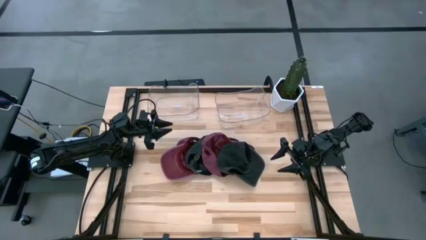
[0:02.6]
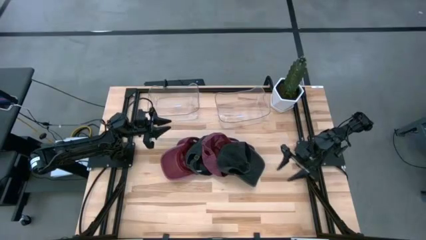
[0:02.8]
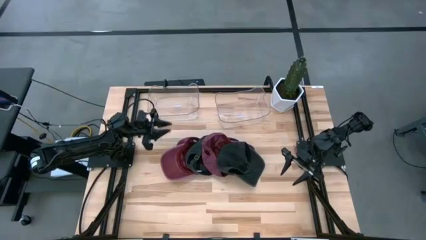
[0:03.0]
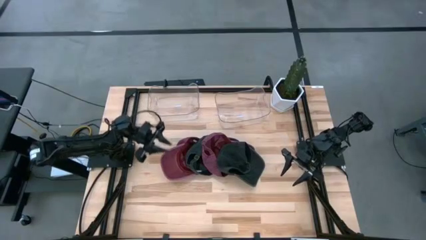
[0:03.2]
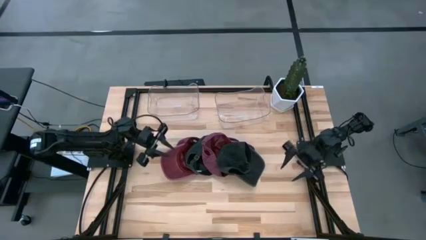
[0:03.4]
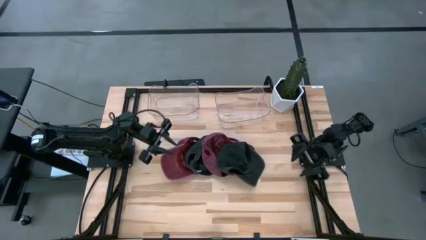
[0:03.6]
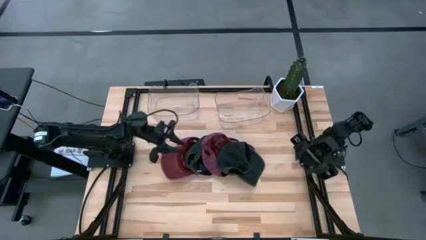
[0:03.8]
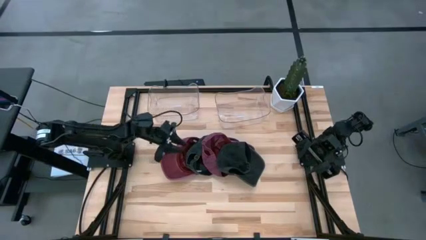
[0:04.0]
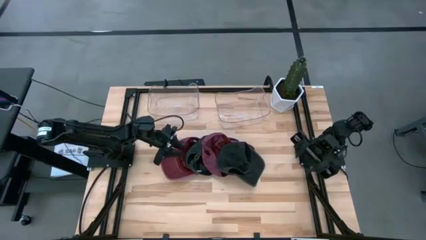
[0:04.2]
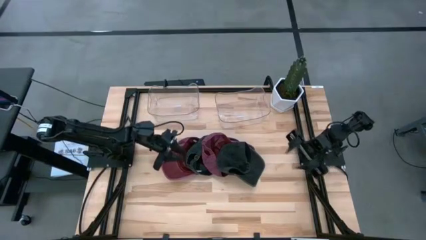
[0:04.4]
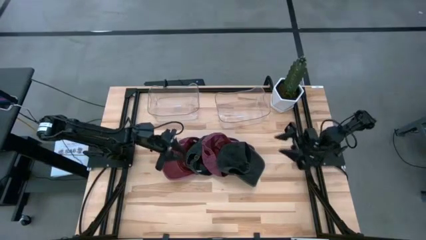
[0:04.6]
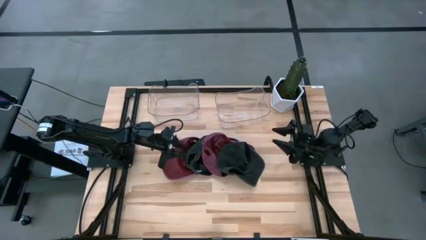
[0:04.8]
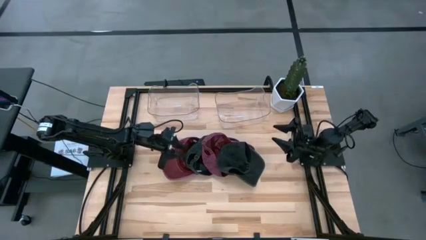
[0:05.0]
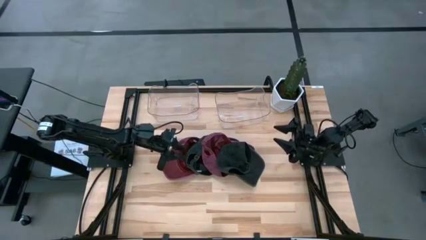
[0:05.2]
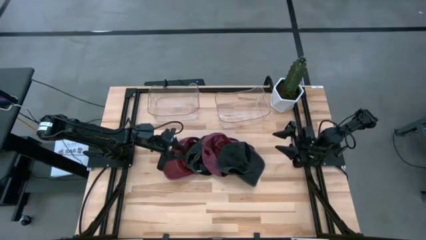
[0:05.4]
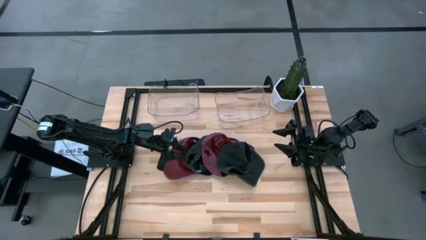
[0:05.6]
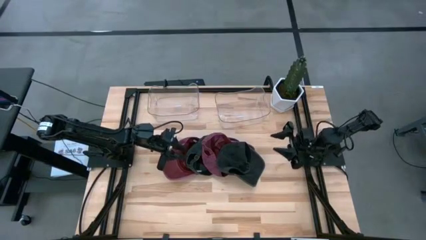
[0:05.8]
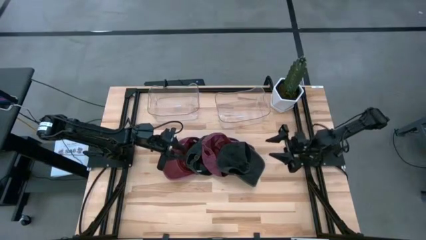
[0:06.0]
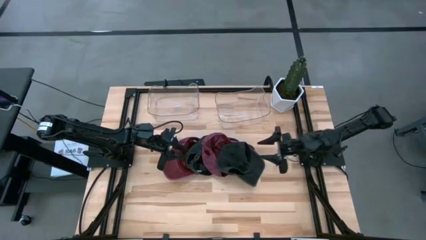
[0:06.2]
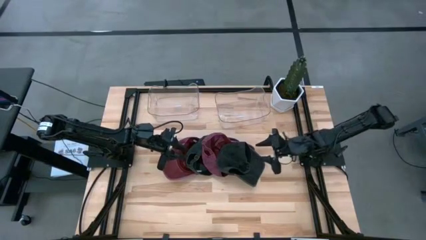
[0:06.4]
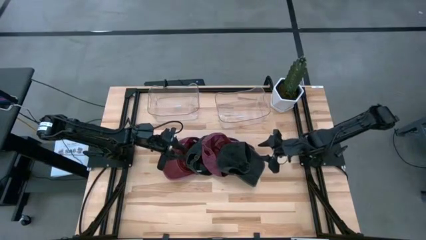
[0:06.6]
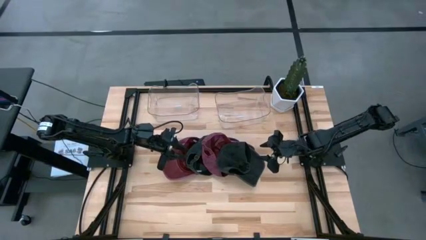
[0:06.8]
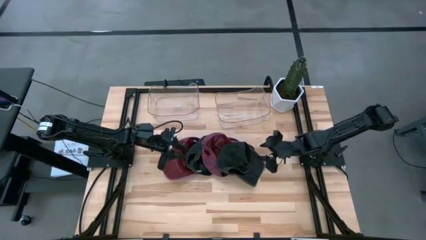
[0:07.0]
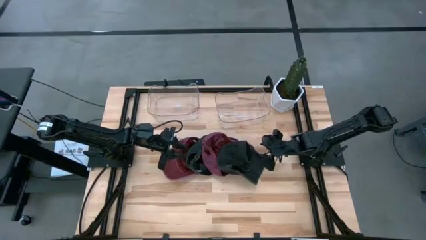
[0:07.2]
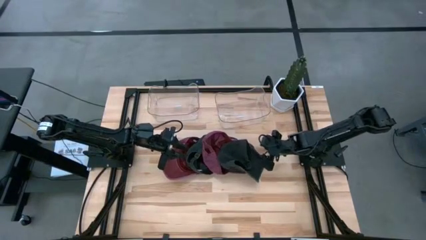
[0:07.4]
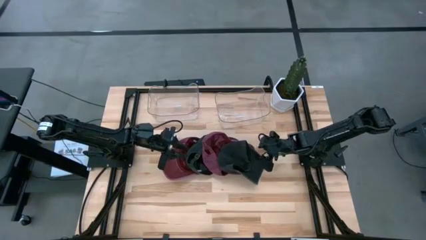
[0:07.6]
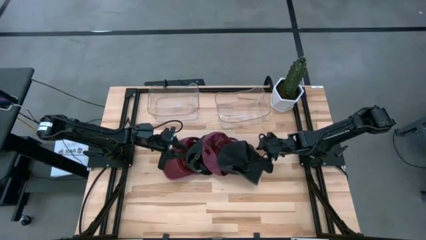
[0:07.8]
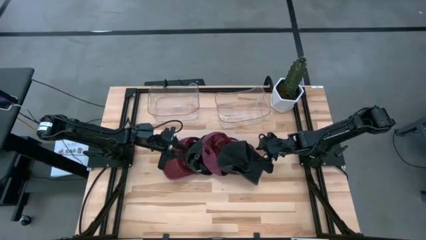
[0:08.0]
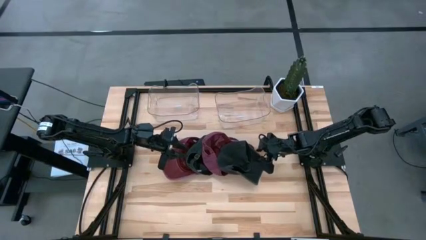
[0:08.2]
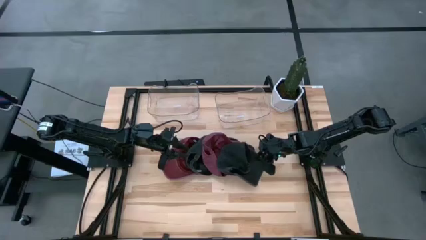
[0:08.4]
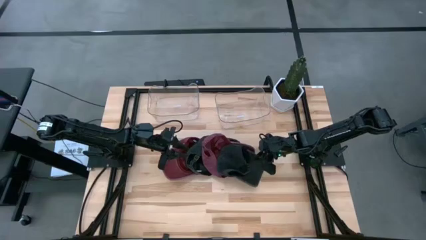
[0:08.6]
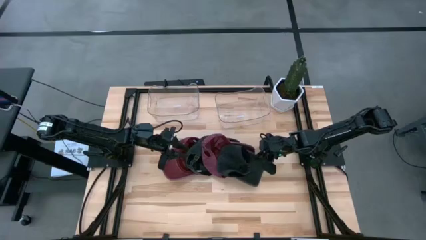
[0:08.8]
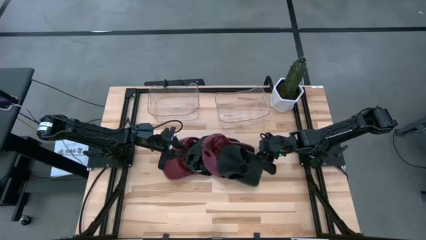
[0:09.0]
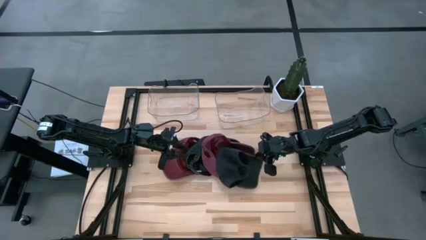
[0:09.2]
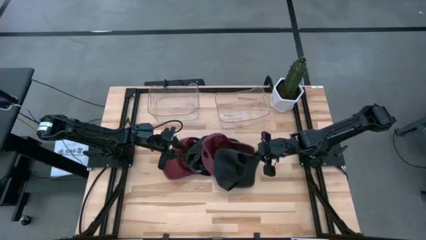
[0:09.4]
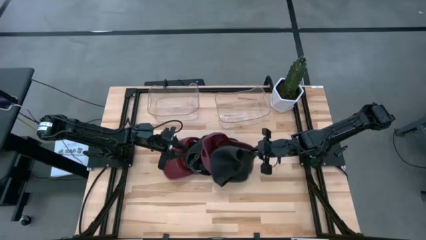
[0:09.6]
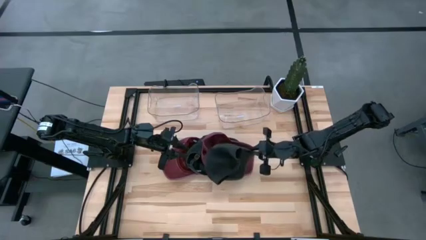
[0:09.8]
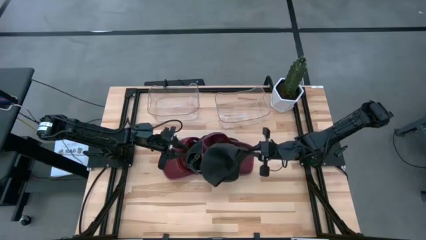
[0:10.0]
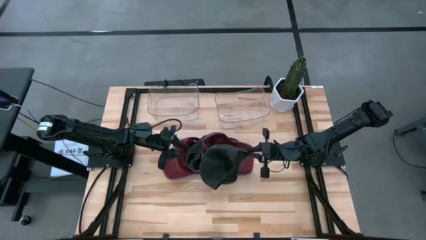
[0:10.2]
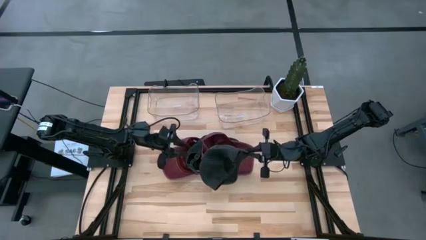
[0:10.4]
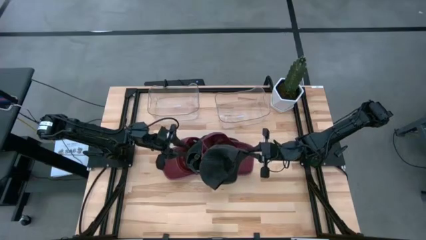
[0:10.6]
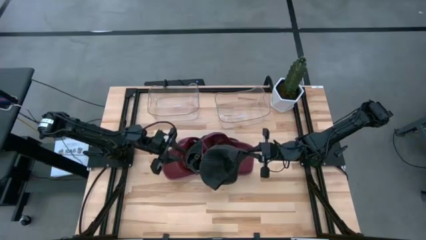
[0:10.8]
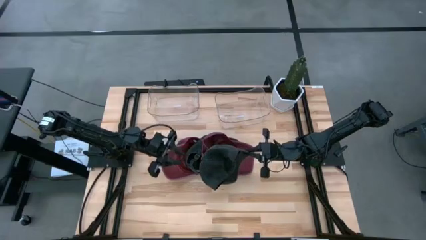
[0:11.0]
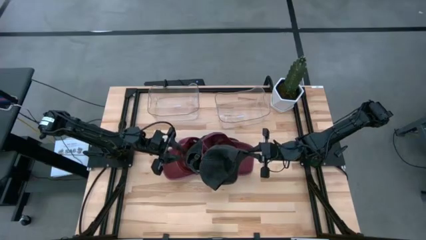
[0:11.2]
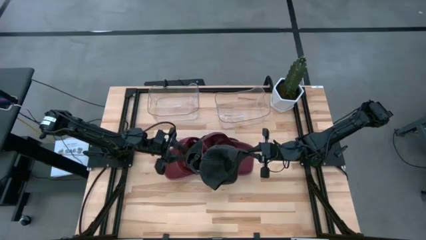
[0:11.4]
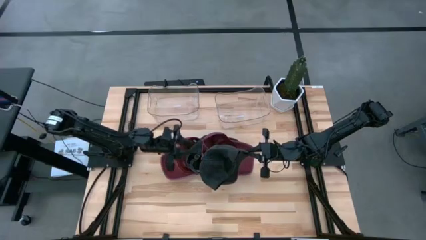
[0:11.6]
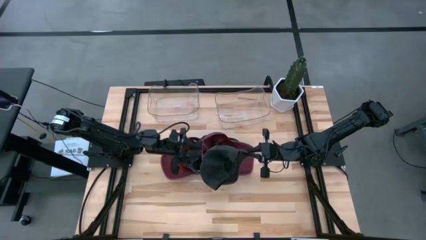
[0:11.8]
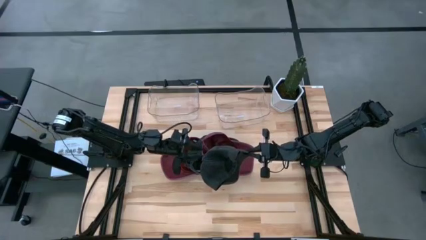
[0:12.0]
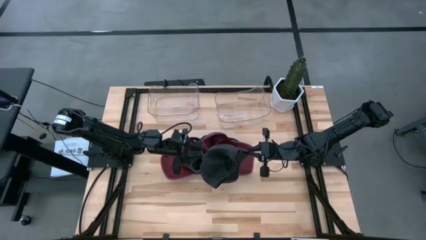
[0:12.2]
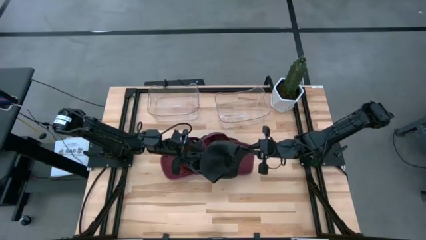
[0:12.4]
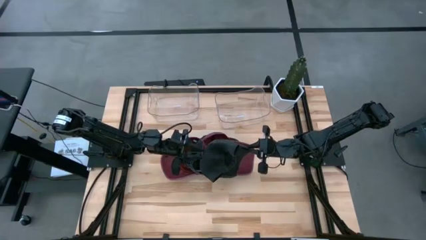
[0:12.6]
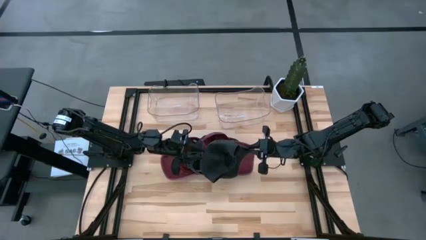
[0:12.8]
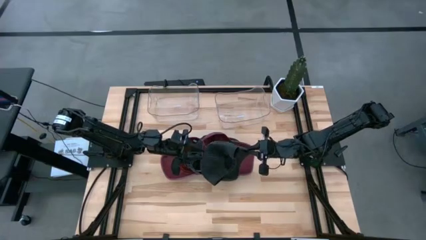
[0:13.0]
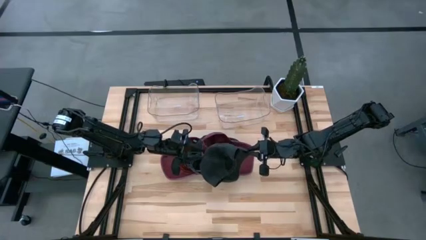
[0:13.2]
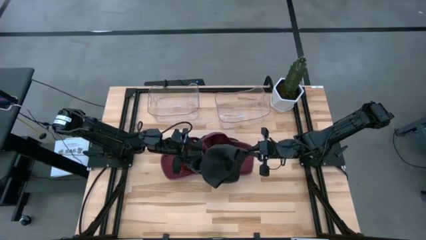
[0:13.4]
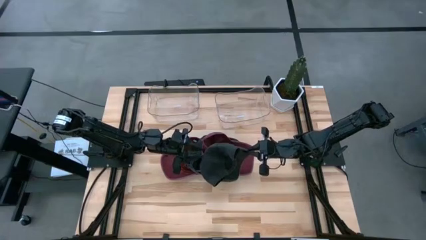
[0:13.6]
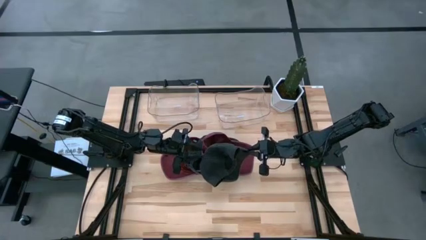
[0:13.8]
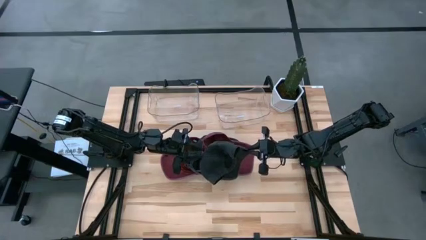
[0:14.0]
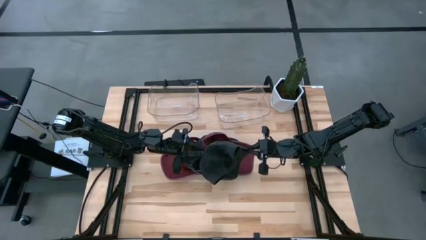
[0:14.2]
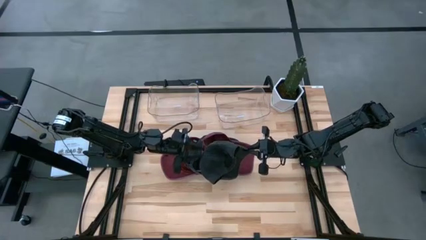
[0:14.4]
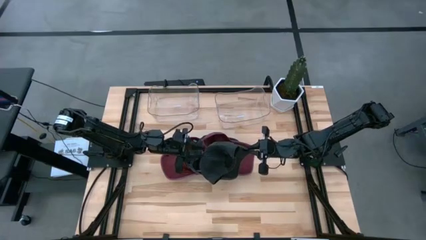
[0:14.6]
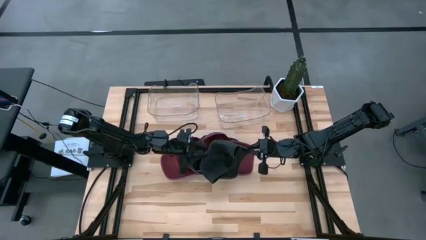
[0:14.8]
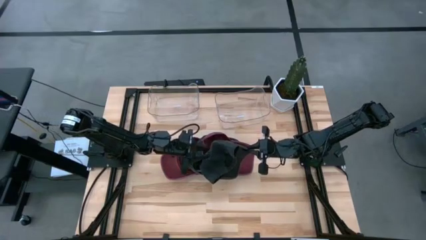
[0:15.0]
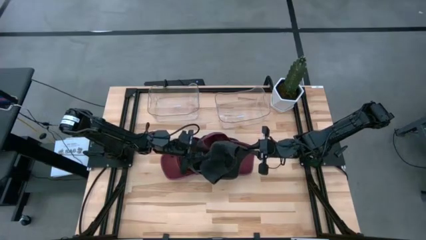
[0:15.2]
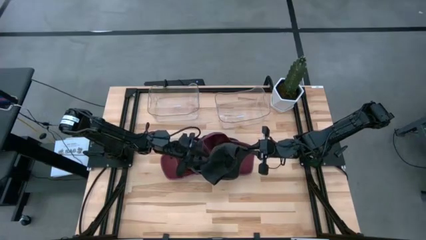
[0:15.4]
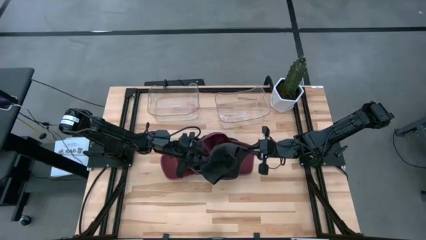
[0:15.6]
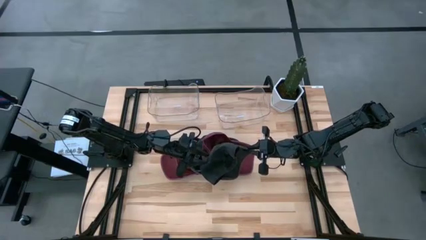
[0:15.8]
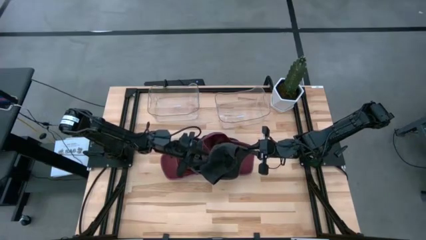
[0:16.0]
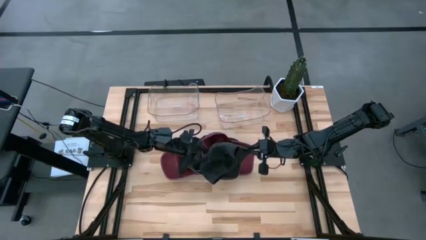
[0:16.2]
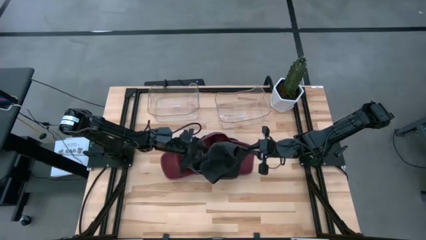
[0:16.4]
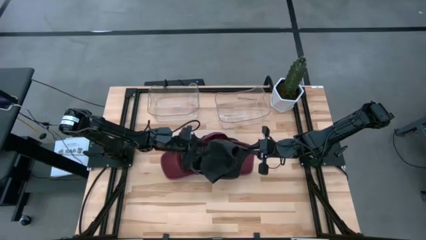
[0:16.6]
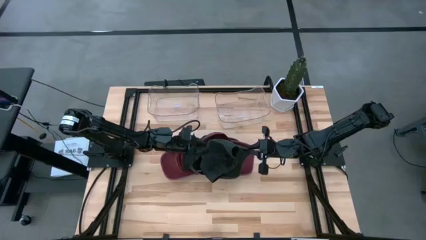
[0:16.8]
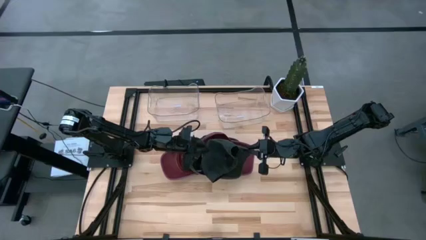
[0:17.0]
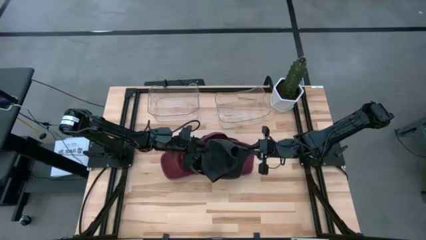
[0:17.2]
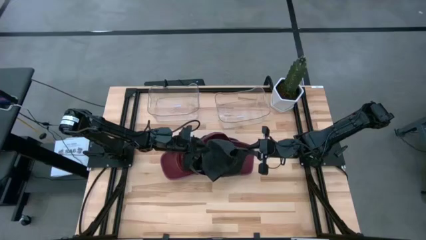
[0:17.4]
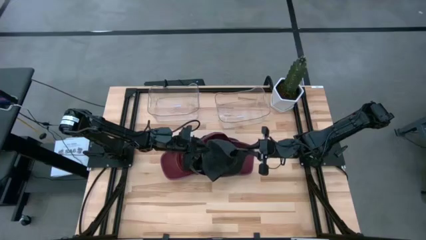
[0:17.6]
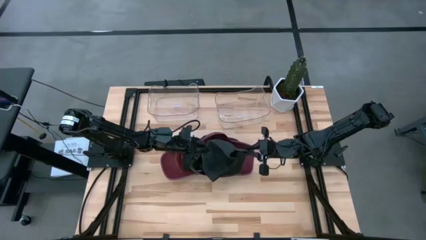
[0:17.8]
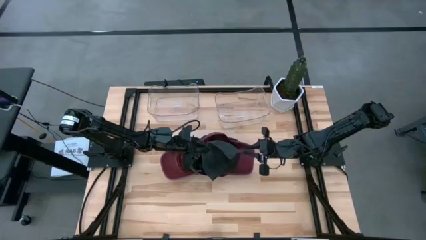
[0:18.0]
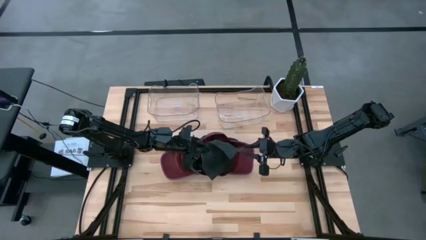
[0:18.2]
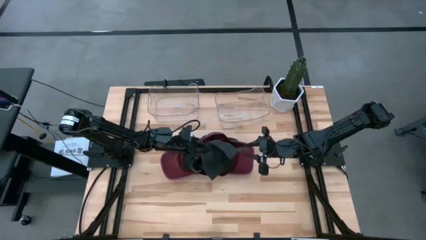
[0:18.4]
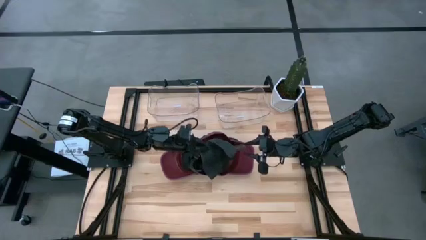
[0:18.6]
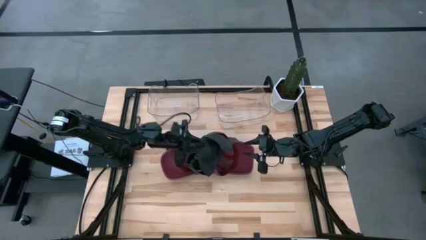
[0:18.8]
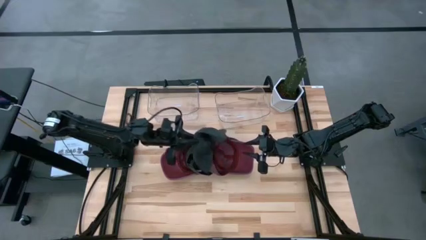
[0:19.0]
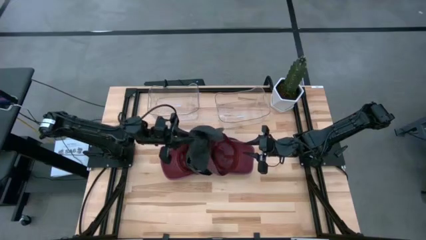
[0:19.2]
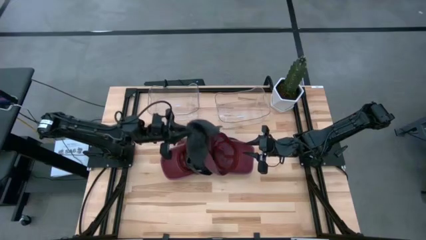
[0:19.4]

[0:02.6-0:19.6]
Task: Pick & Place hat
Put the black cap into the left transparent bin
